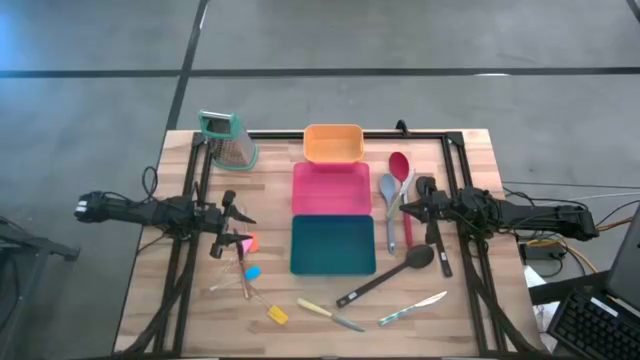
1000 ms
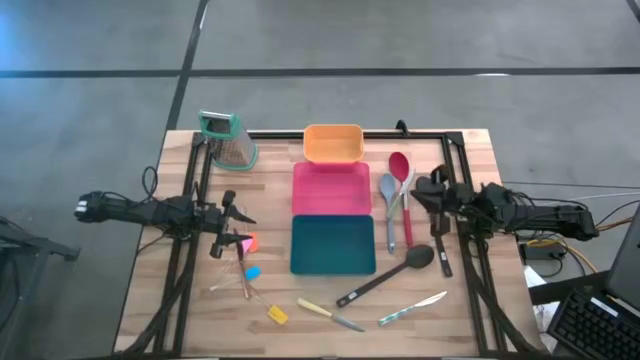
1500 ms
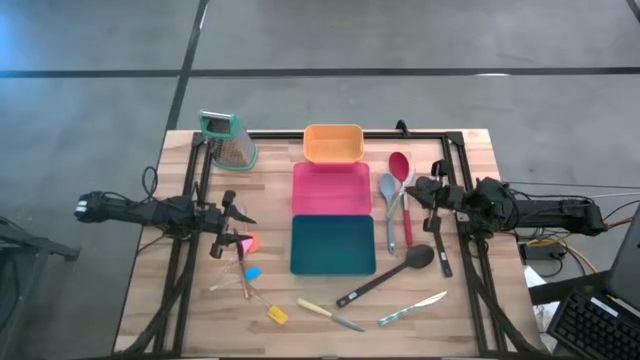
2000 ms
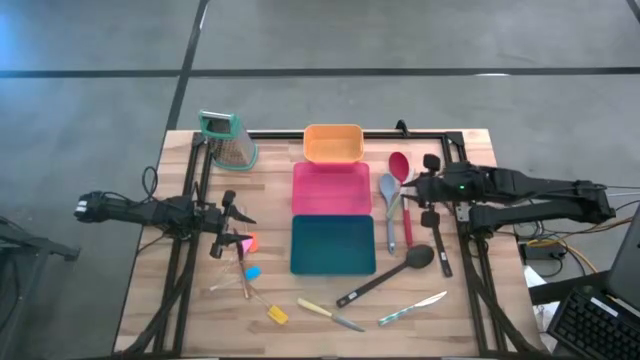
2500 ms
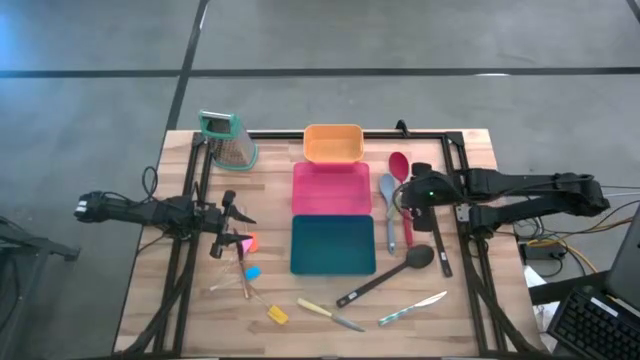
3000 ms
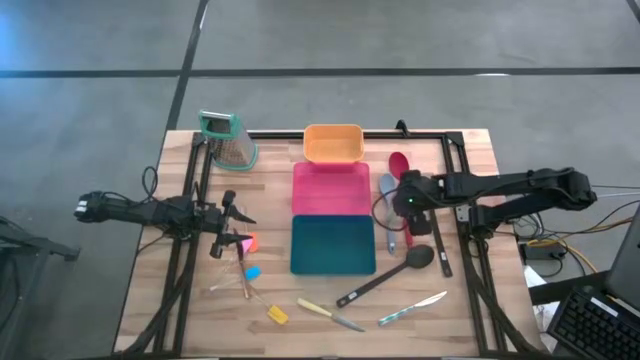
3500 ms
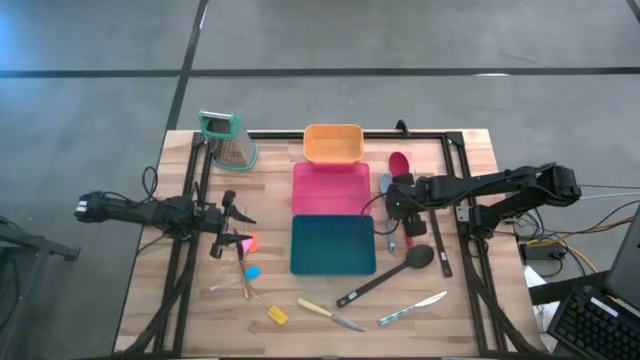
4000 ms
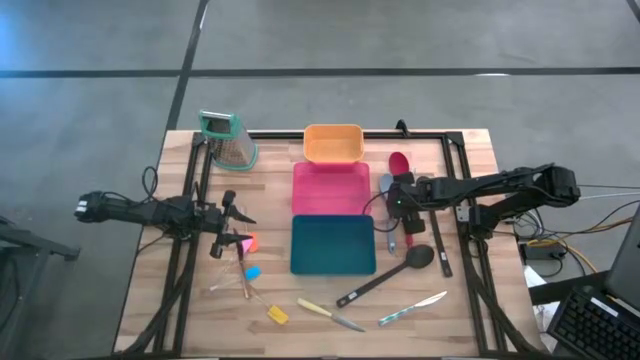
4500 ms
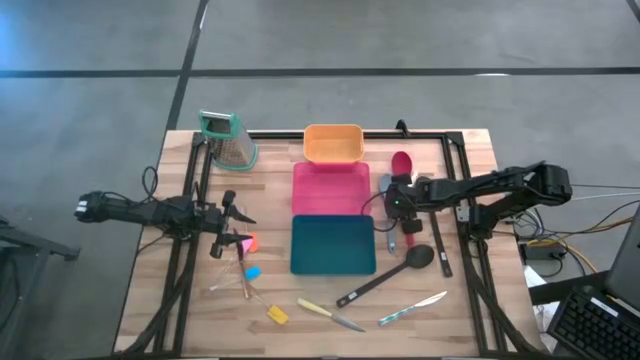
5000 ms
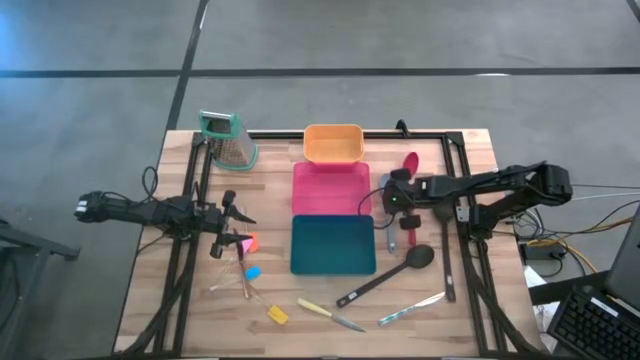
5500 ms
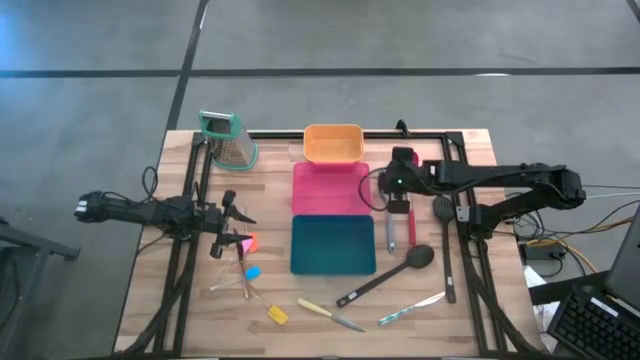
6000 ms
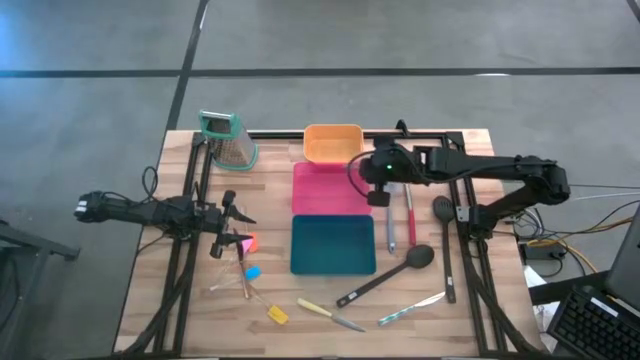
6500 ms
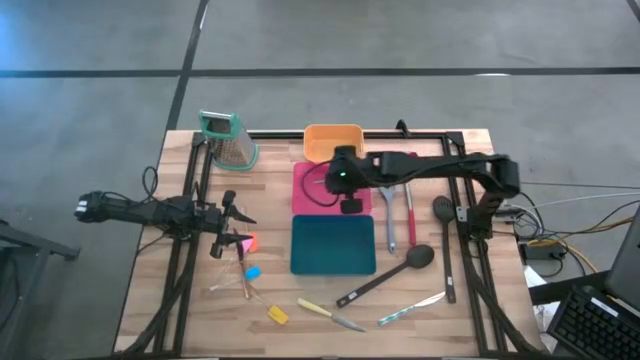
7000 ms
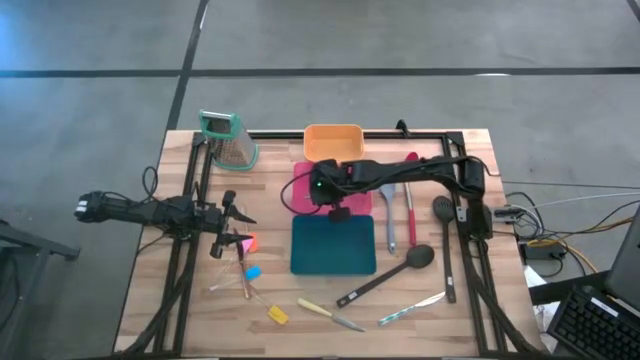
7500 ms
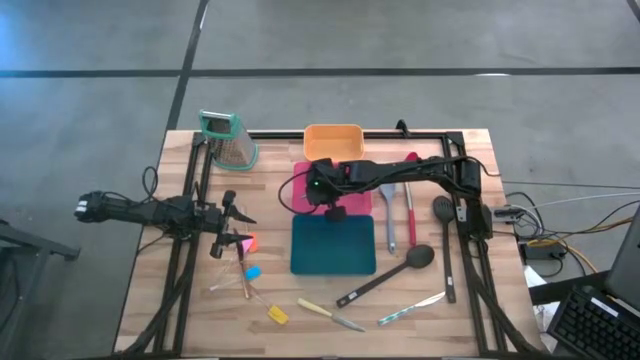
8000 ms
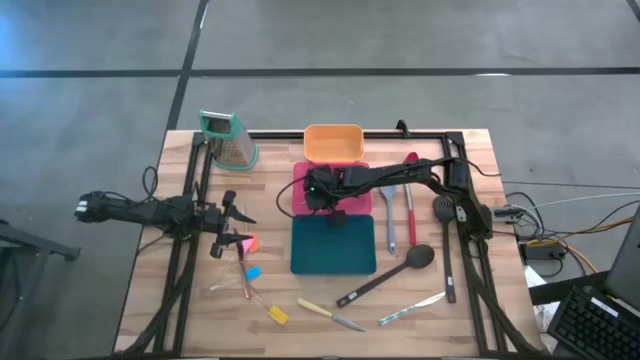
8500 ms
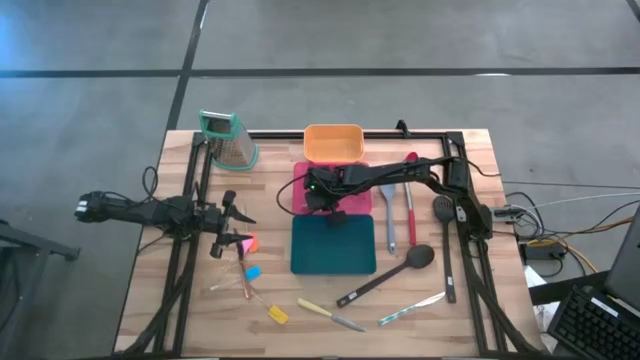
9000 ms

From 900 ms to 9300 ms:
Task: Pick & Place Kitchen Items
Put the green knife into the red bin

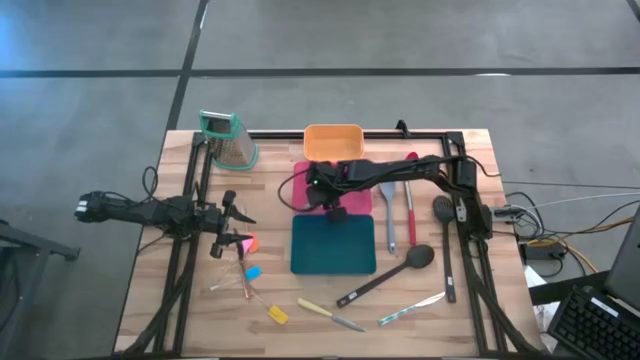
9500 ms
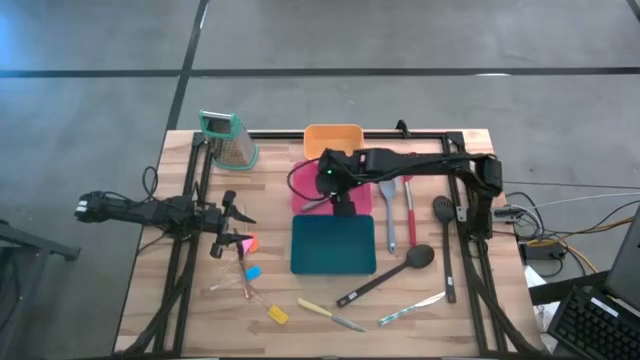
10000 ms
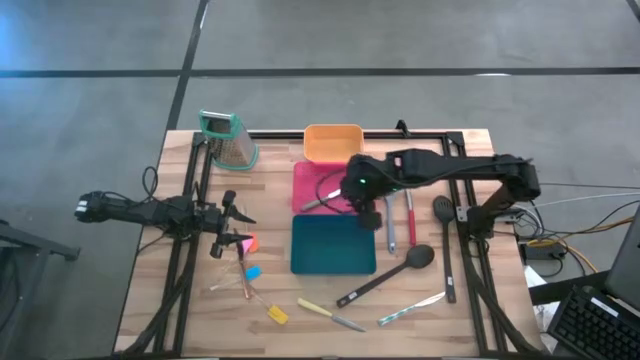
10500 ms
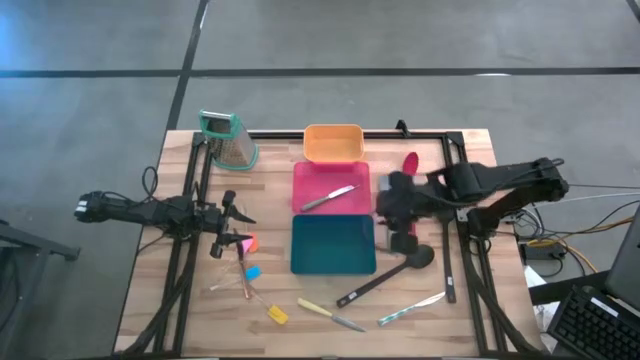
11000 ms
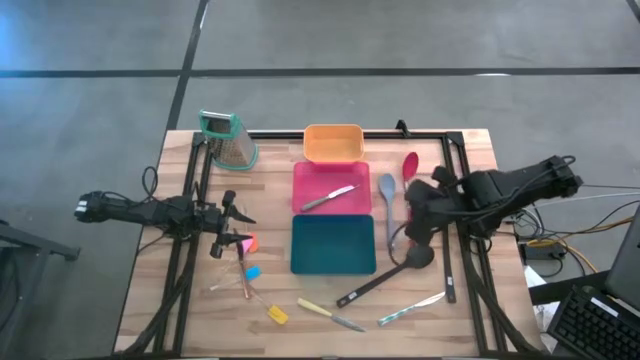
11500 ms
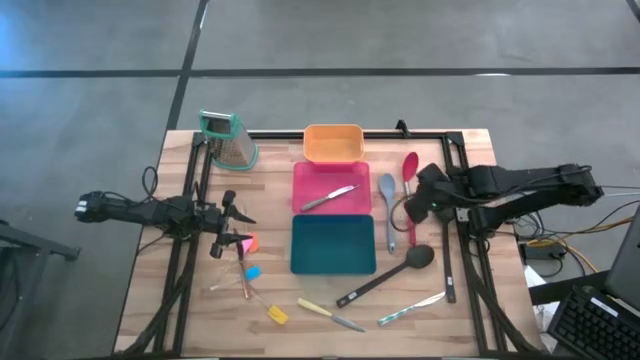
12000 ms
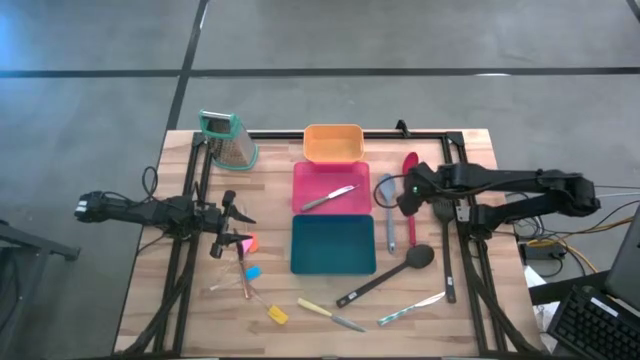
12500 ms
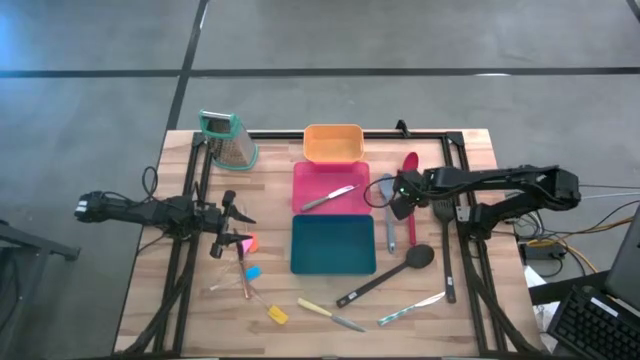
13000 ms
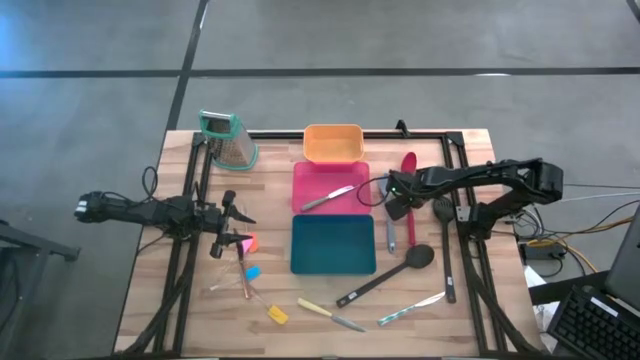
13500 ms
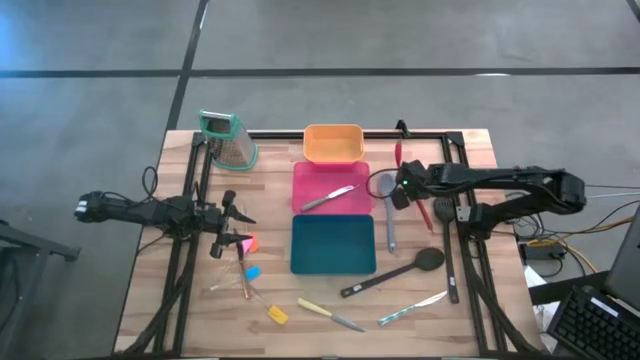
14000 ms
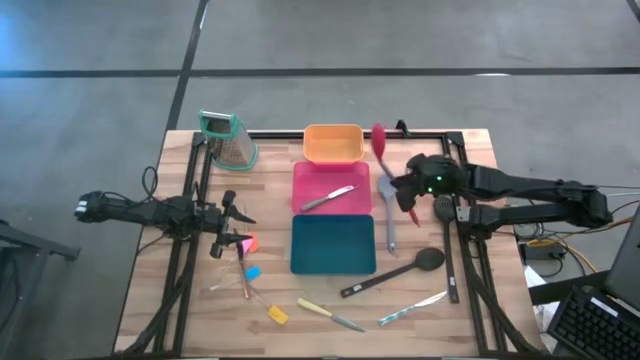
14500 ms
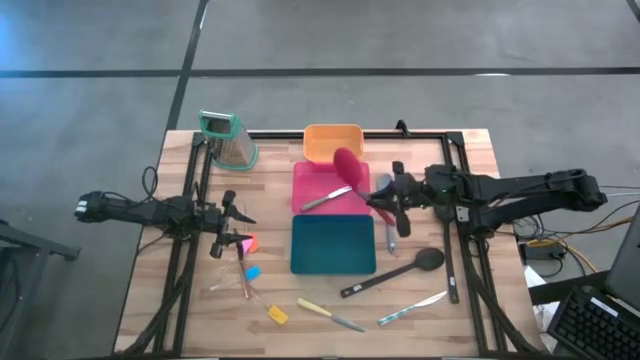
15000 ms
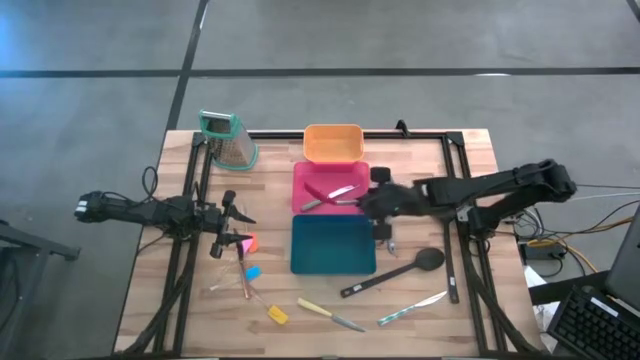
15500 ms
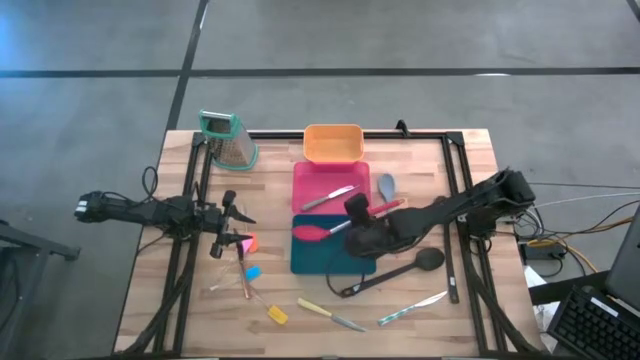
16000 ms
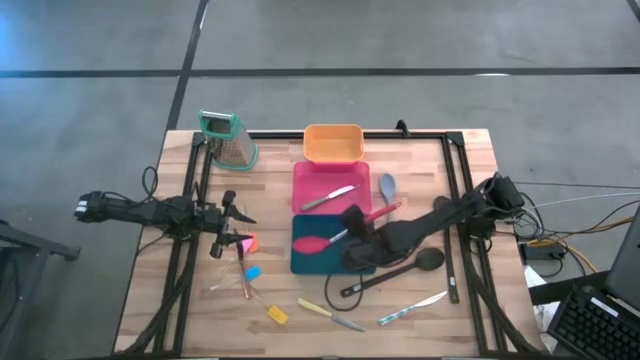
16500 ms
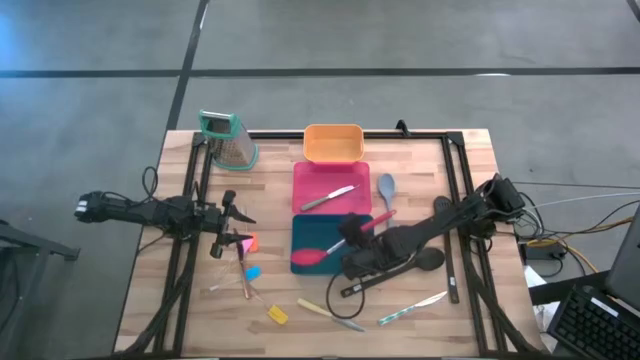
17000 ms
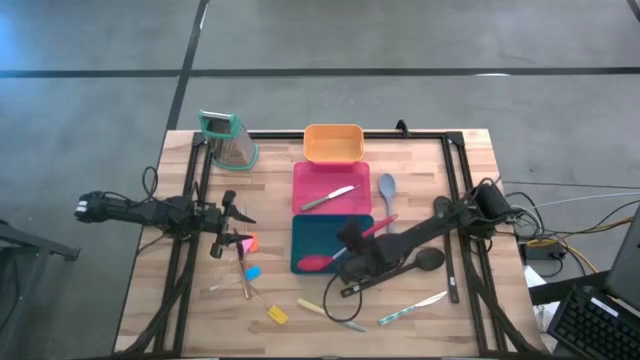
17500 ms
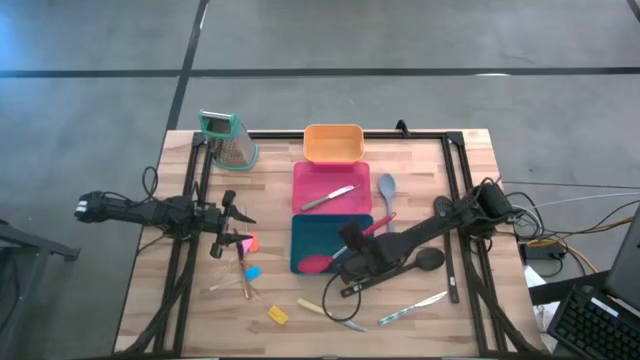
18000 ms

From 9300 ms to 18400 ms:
Put the red spoon into the blue bin

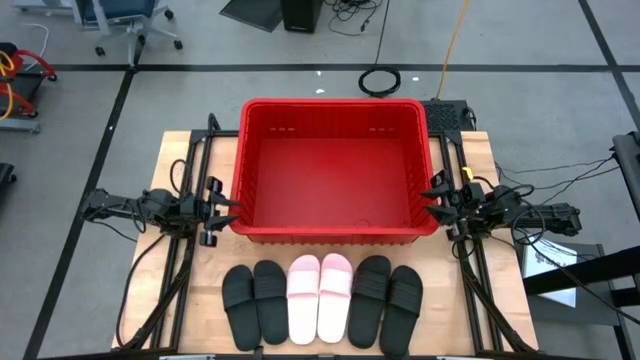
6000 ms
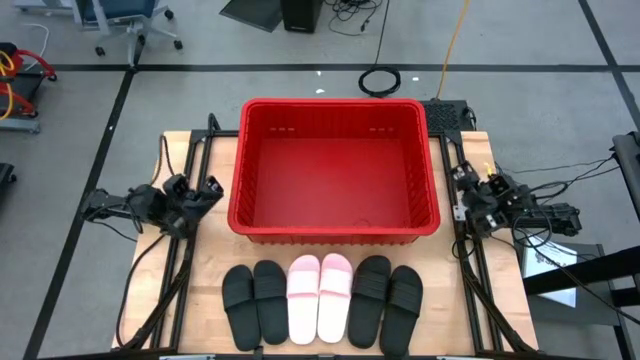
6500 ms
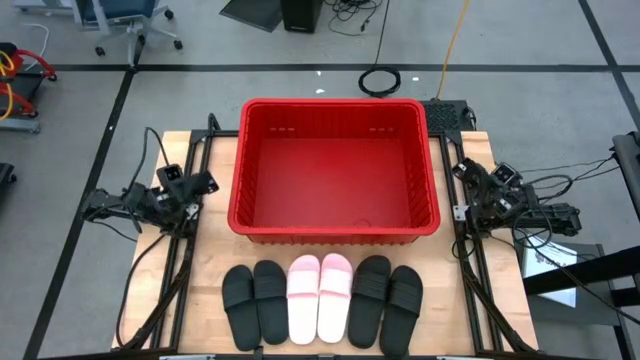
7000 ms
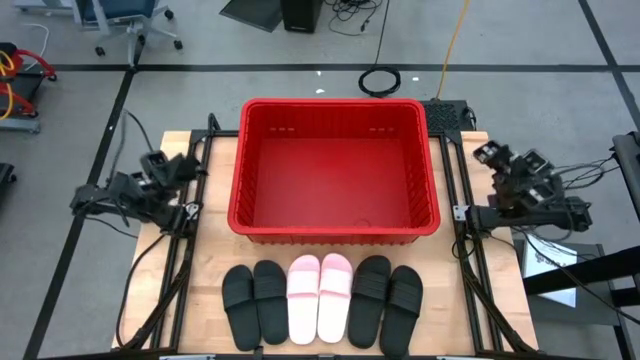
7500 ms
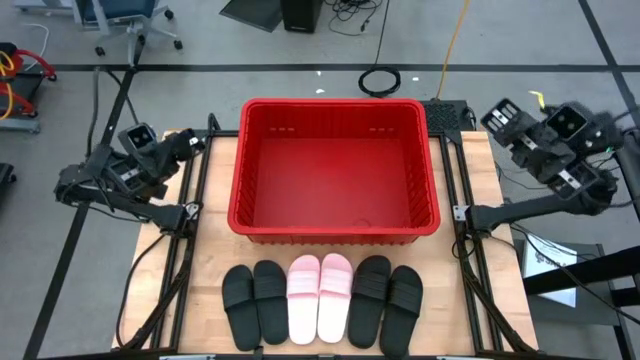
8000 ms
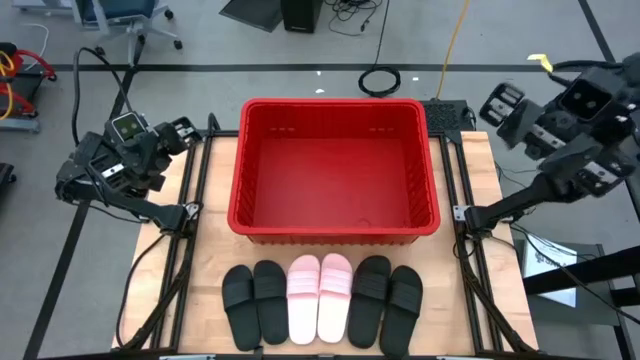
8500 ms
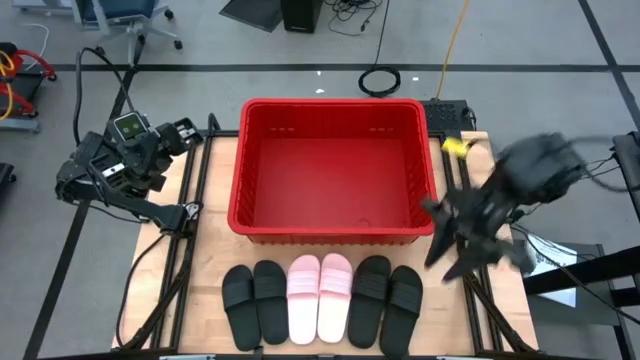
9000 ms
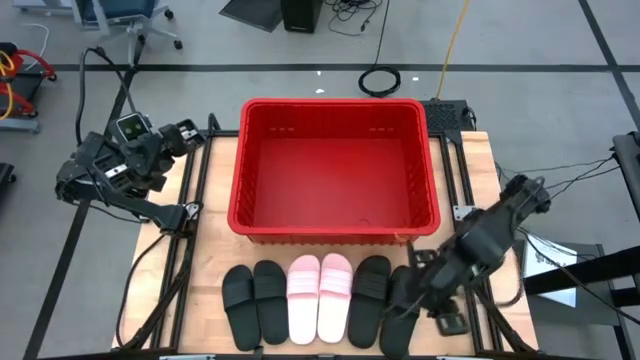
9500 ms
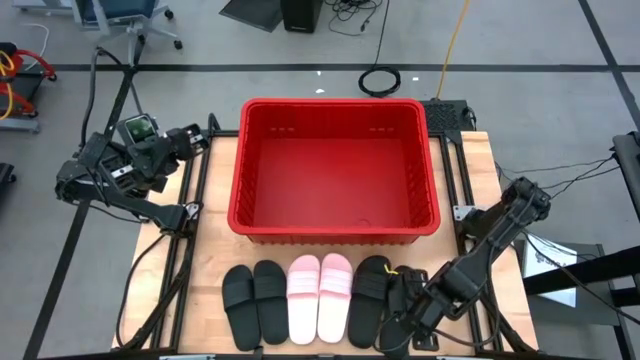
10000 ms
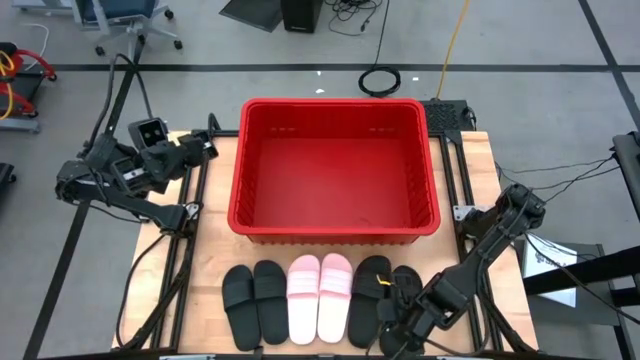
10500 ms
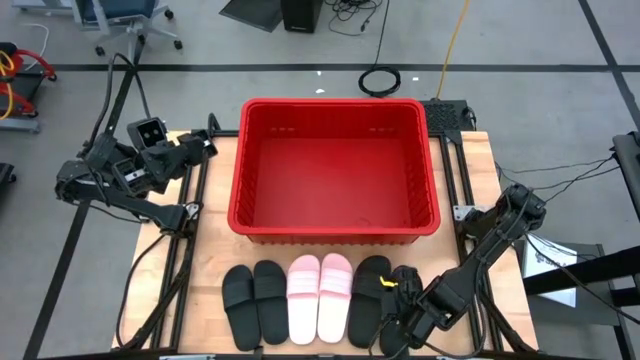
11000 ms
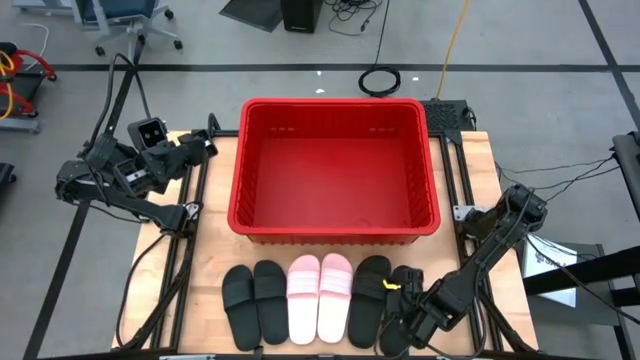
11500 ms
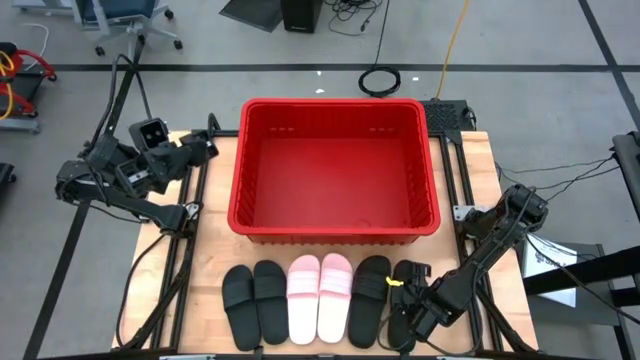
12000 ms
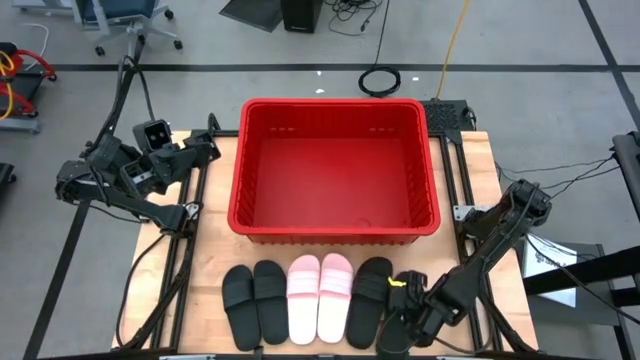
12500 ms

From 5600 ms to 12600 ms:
Task: Pick and place slides into bin
Put the black slide into the red bin
